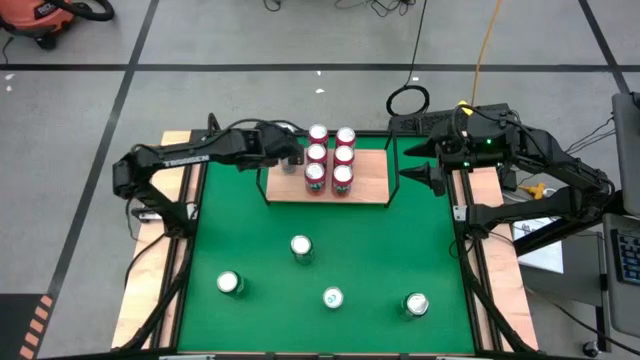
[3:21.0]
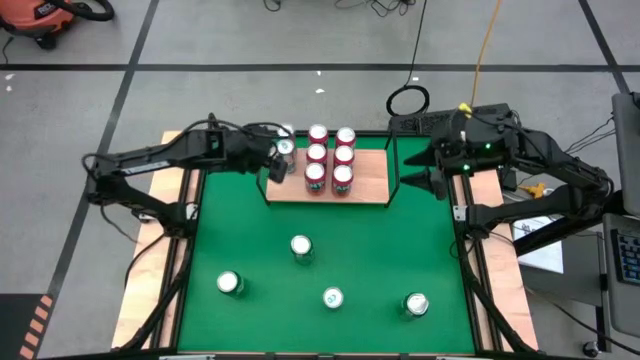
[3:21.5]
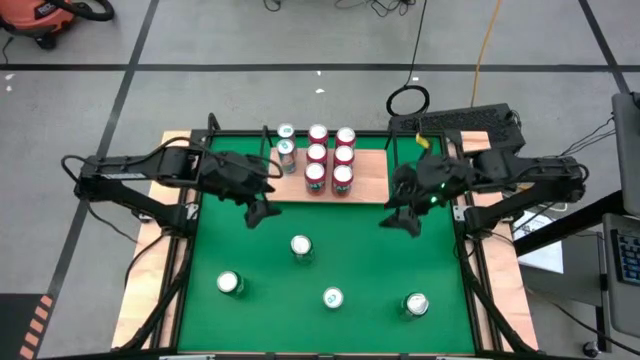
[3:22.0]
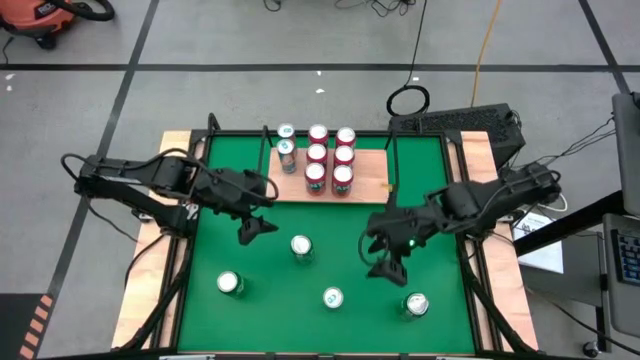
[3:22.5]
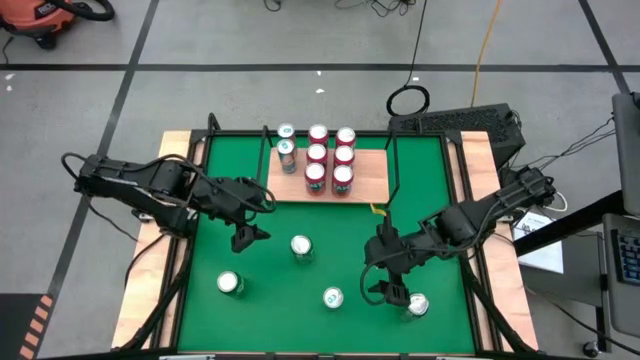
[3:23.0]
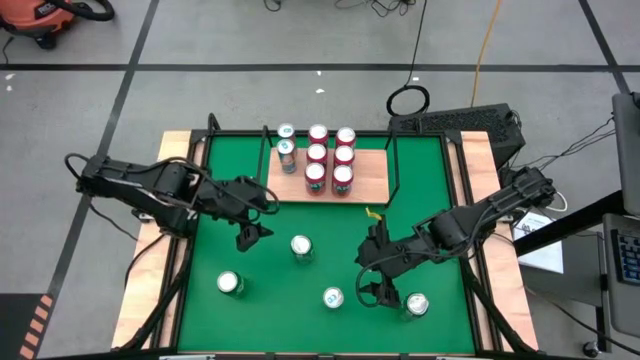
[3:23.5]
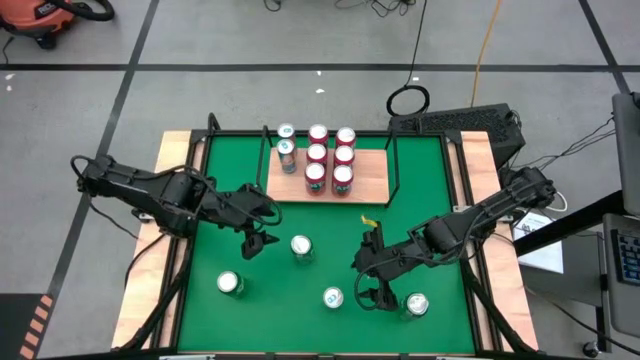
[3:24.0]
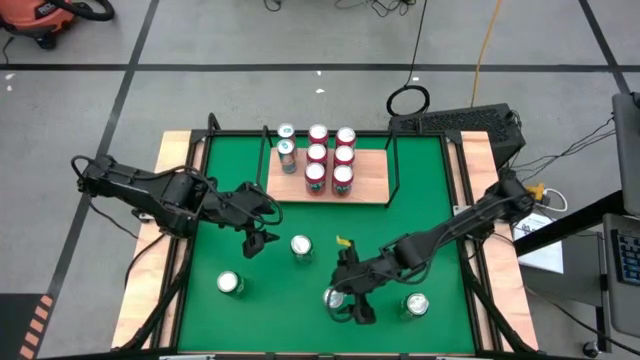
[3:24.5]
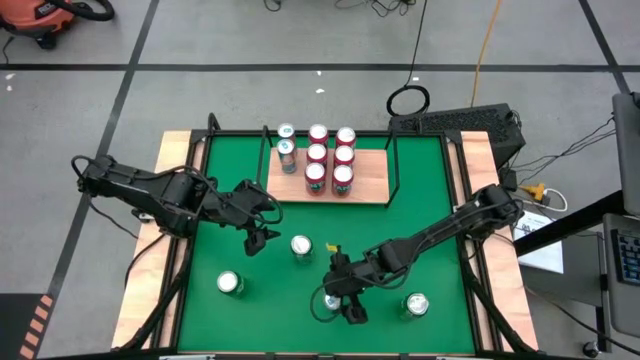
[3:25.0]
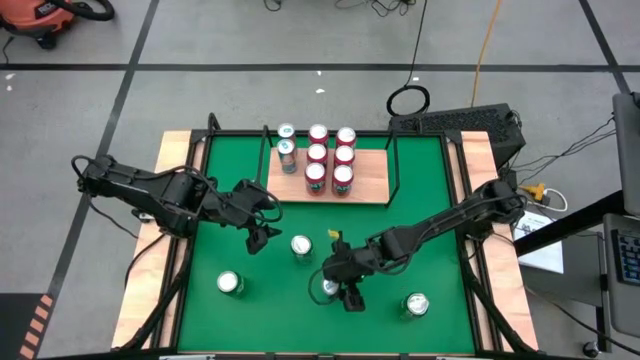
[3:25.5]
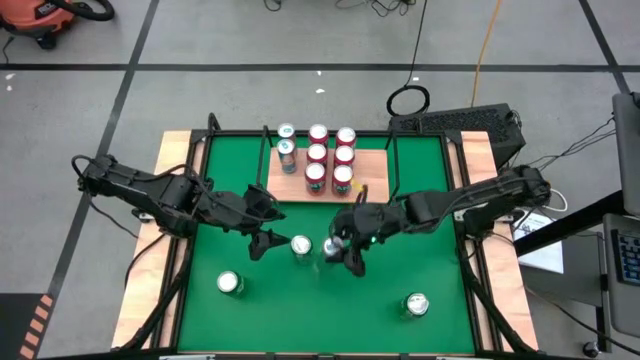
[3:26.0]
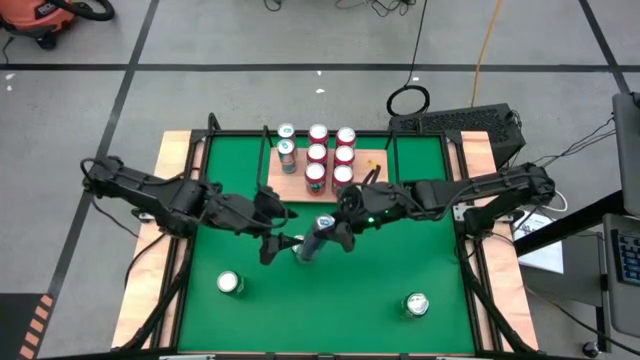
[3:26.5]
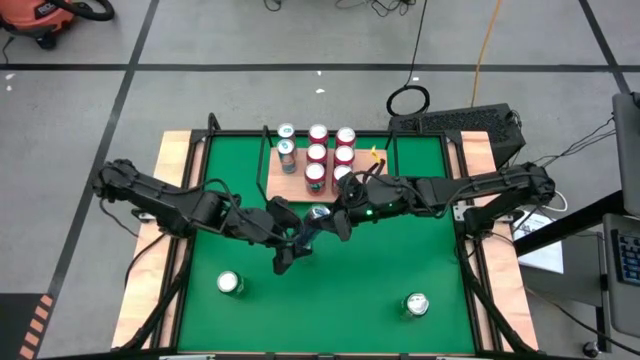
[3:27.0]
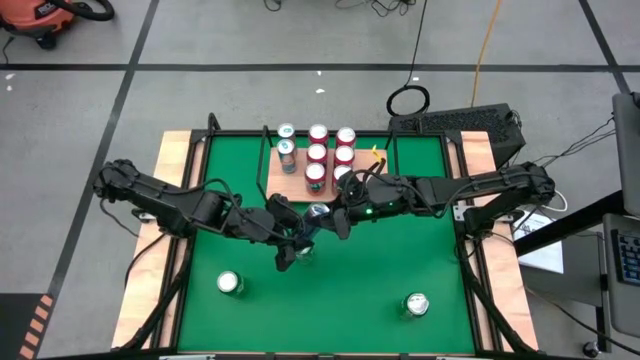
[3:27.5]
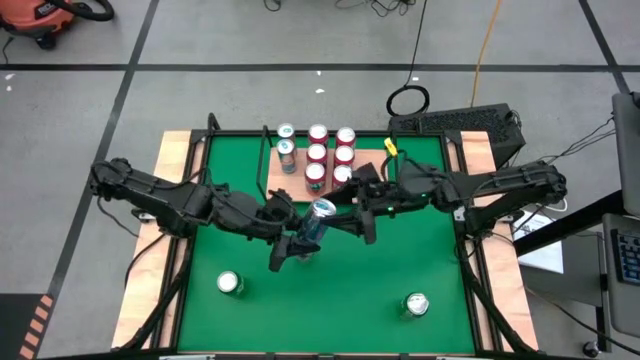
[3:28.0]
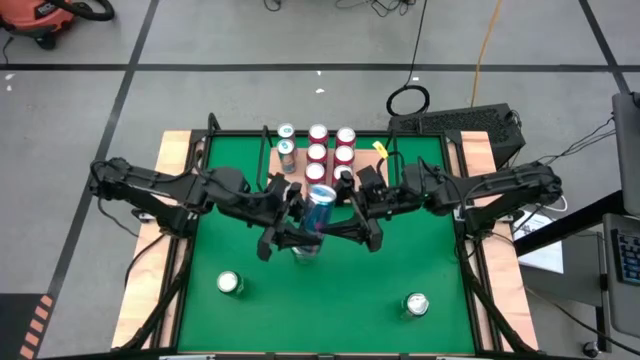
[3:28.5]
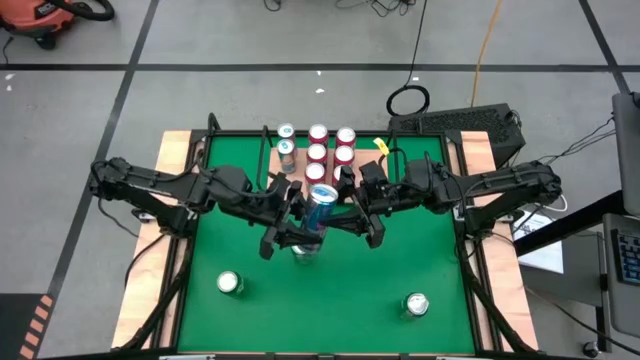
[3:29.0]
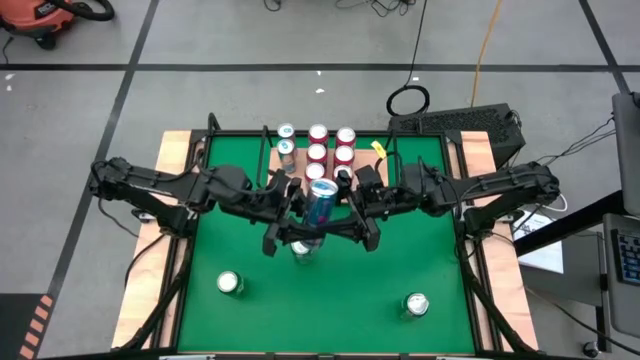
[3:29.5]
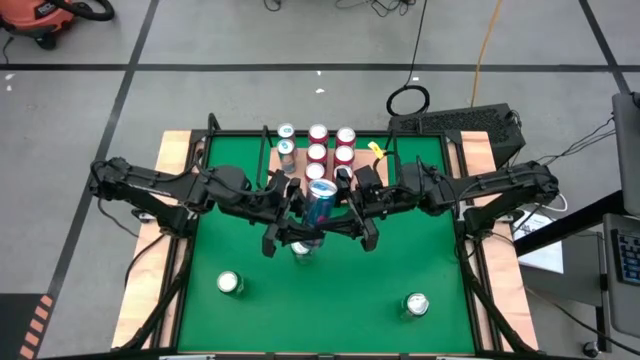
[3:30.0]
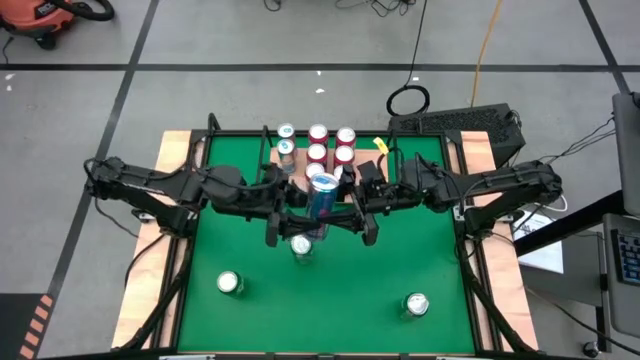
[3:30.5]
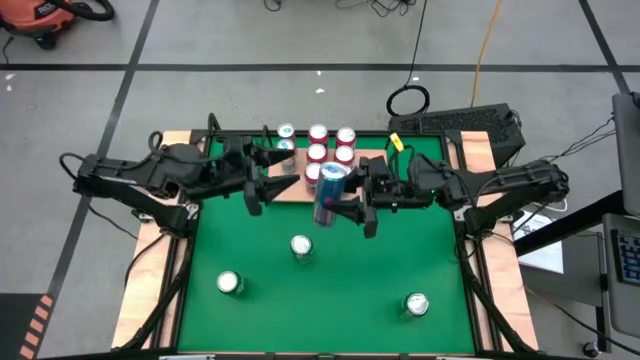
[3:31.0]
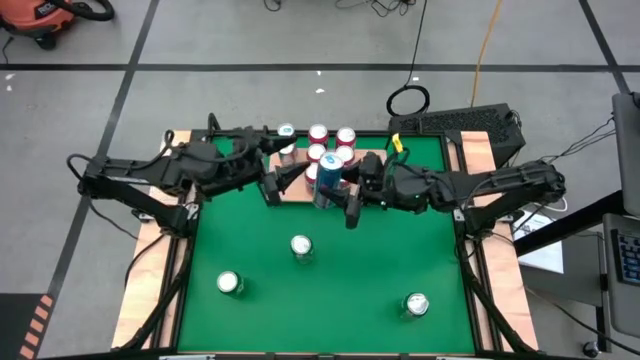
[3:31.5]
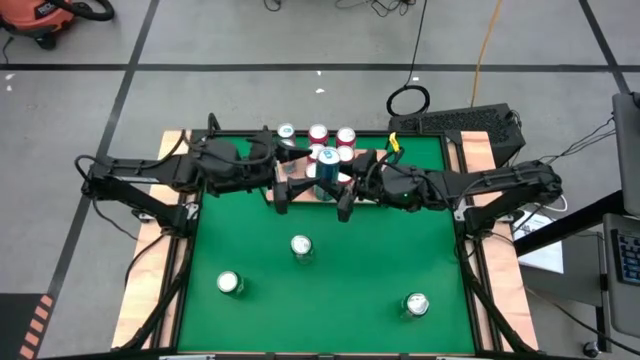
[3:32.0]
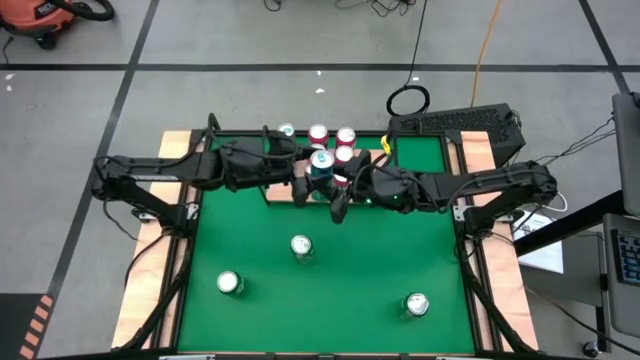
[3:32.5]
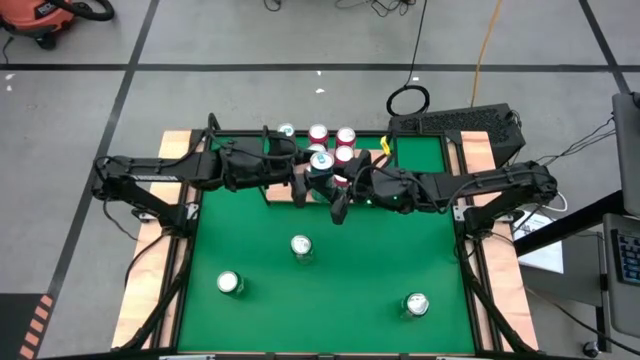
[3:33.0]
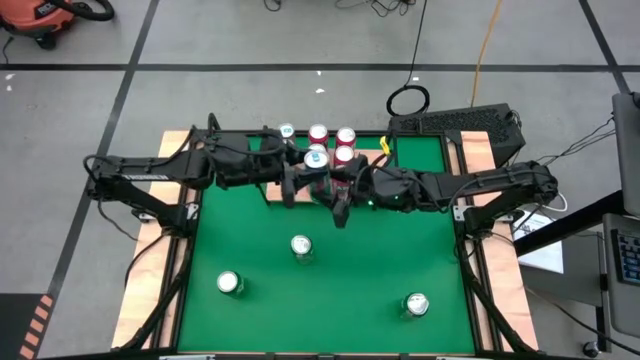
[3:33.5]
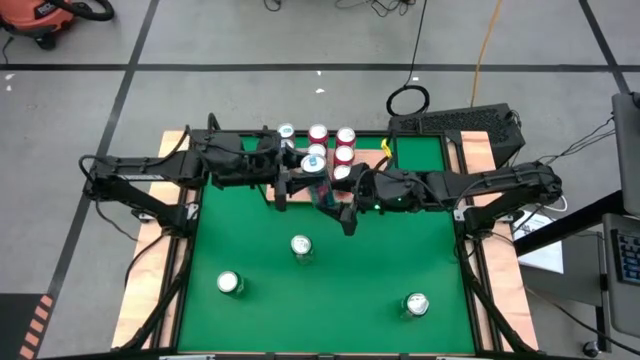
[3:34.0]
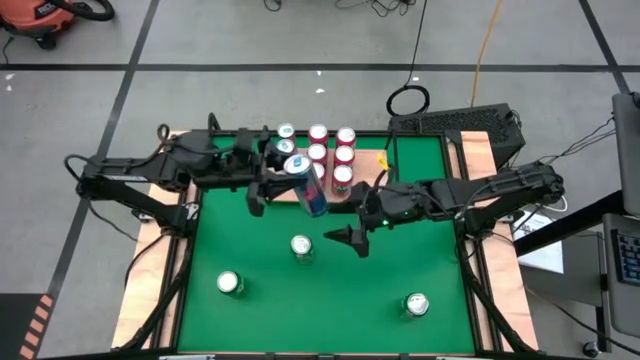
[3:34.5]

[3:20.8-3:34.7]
Task: Place canned beverage on shelf
Put the blue soda can on the shelf aligned with the other blue soda cans

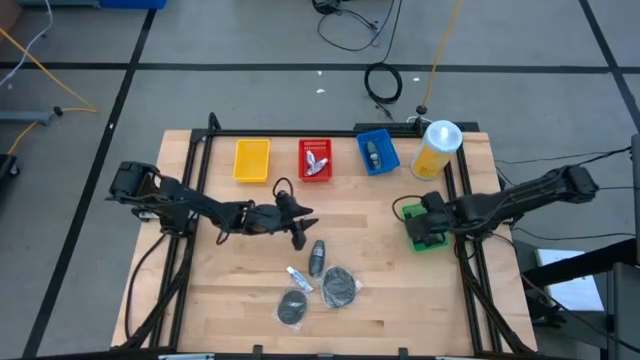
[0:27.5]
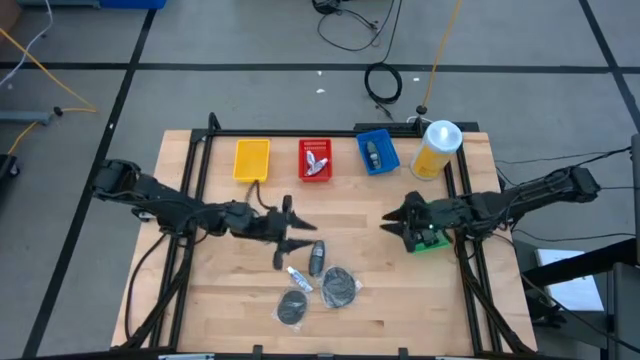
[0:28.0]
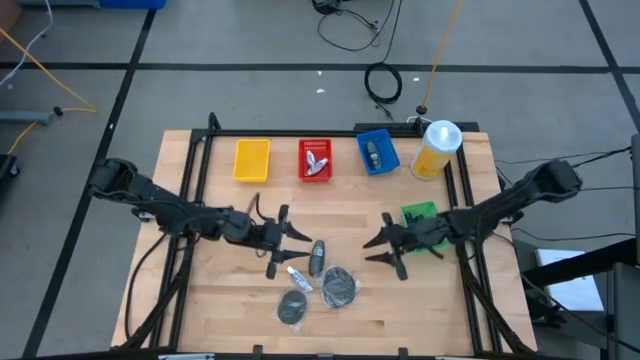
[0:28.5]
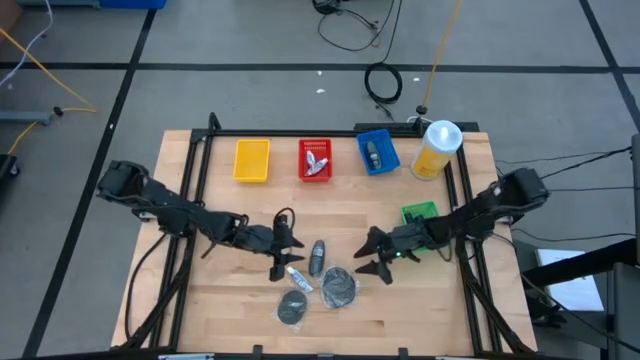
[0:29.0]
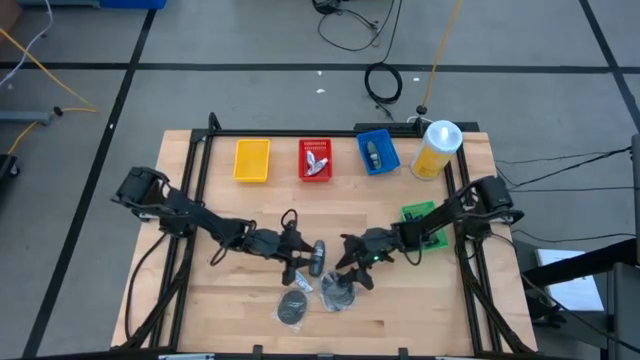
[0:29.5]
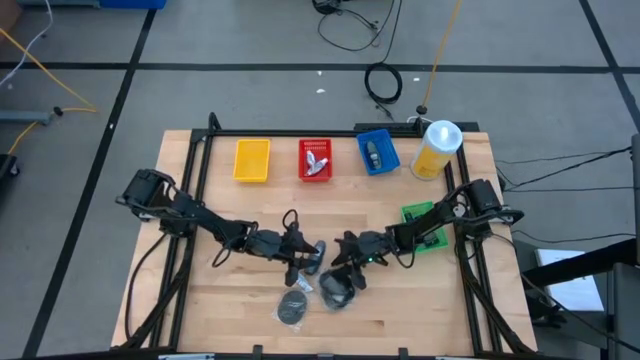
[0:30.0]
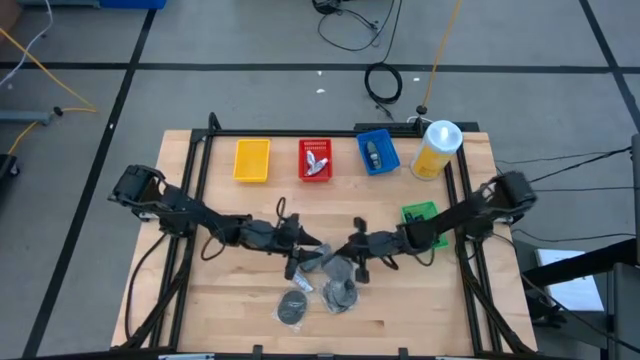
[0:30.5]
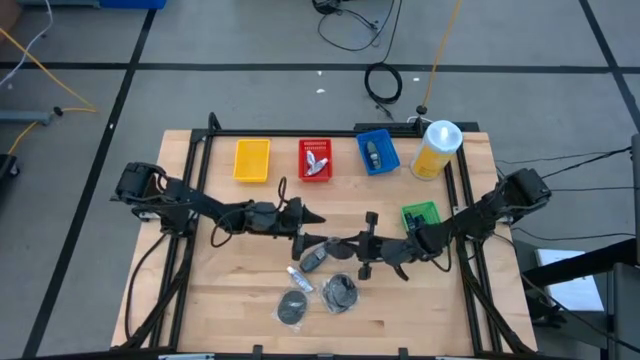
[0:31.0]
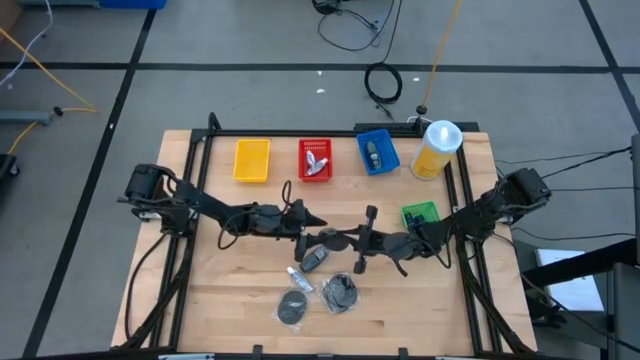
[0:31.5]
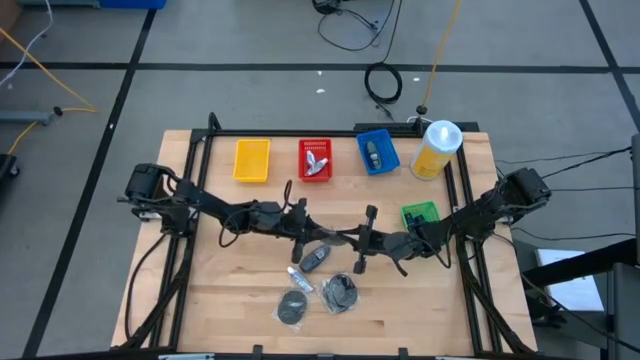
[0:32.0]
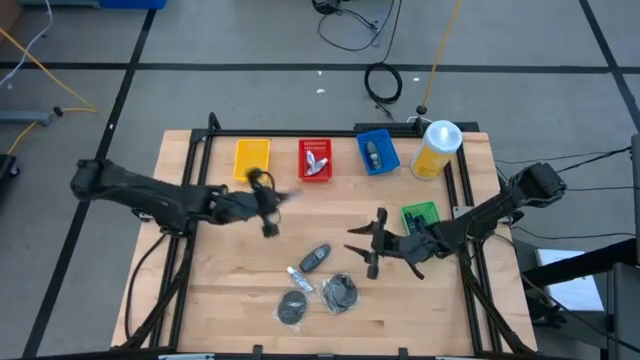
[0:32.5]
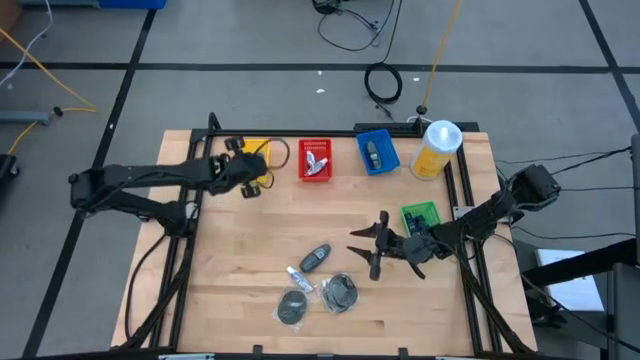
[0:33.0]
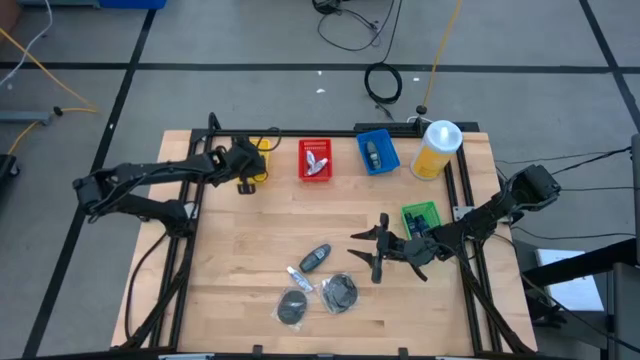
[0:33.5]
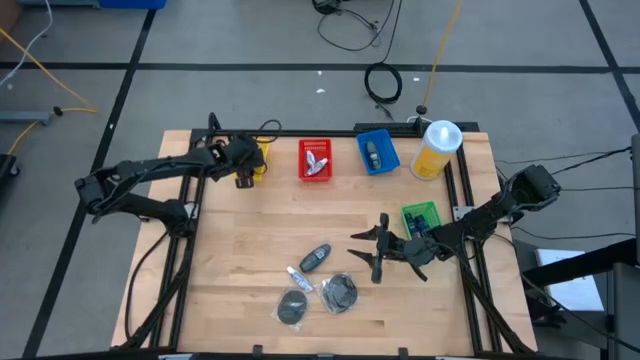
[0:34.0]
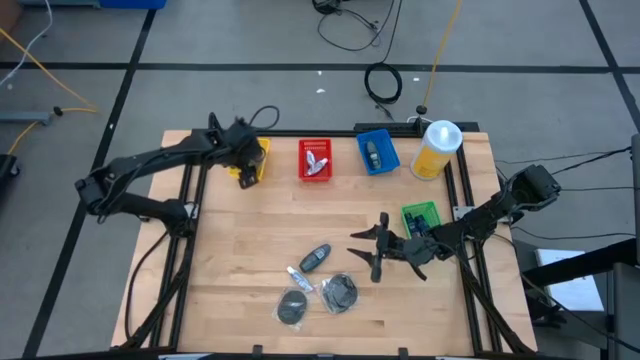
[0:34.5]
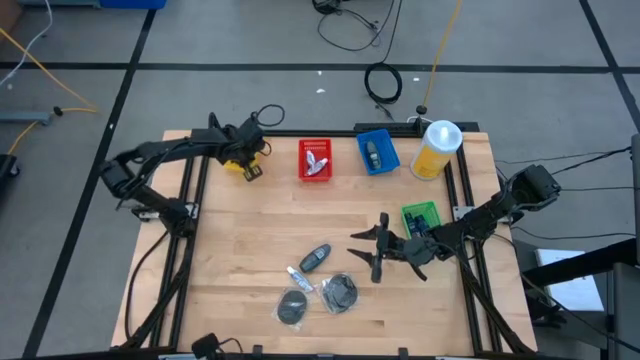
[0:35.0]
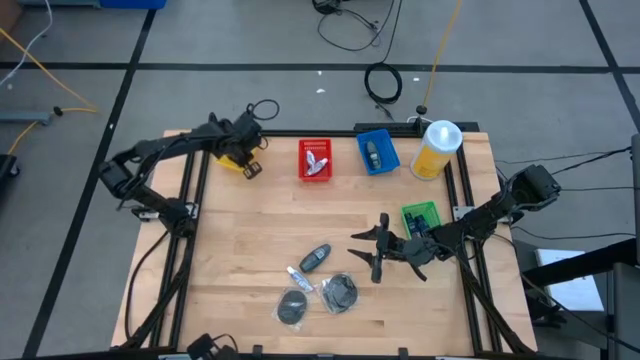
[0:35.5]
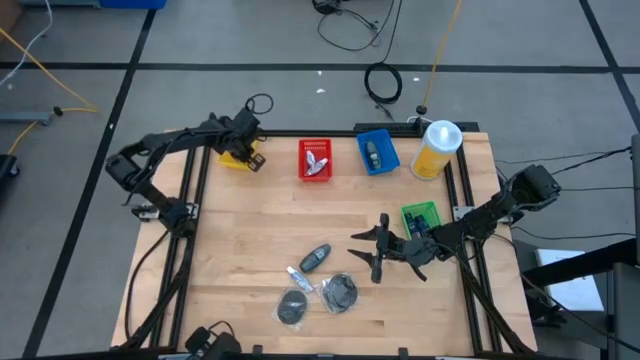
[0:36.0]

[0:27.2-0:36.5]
Task: Pick & Place Travel size toiletries
Put the black hairbrush into the yellow bin
